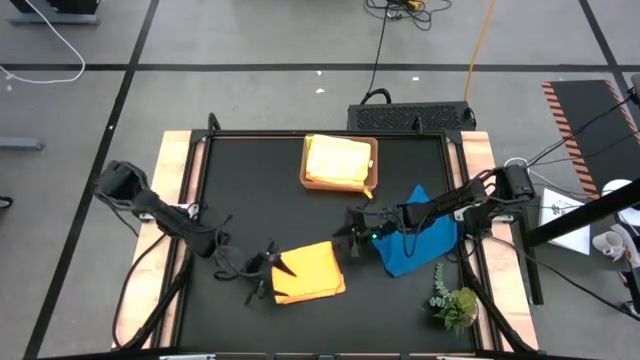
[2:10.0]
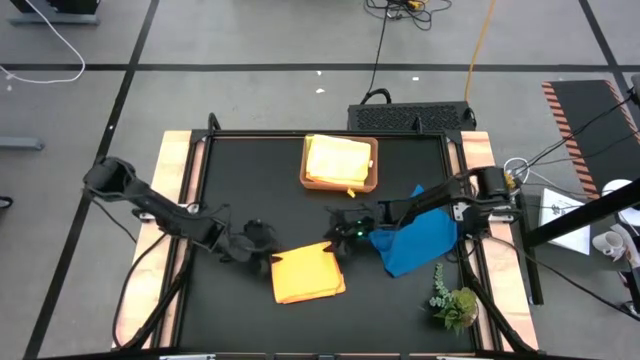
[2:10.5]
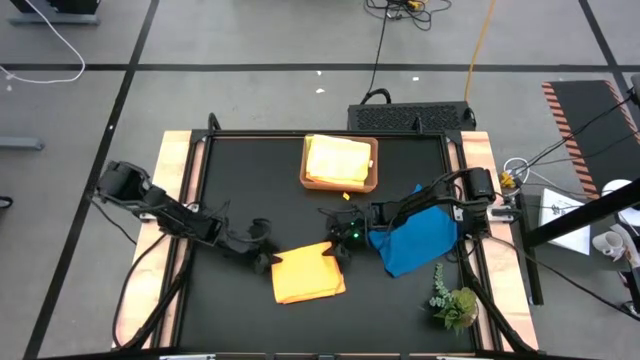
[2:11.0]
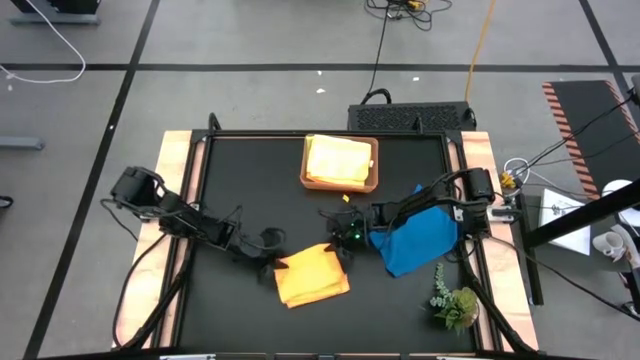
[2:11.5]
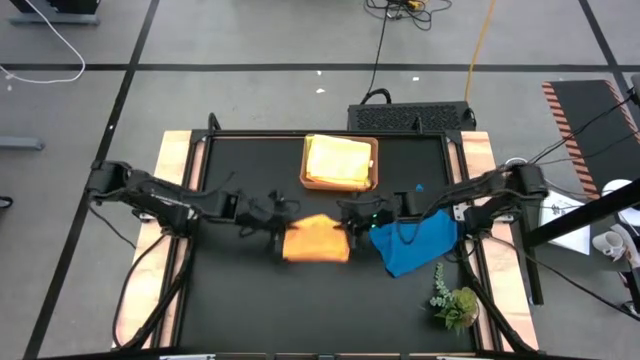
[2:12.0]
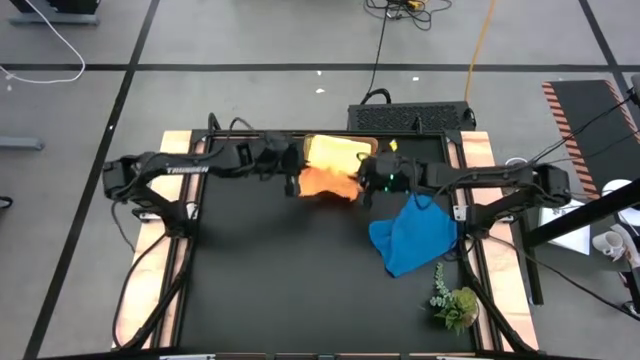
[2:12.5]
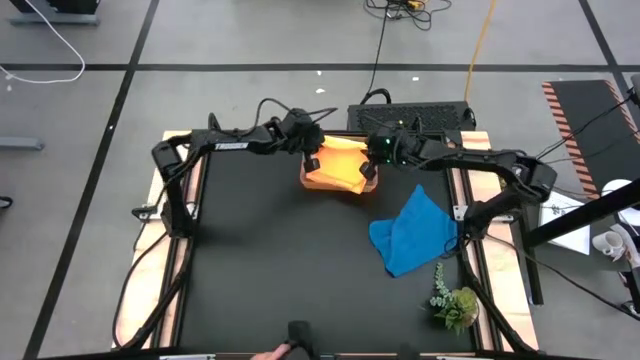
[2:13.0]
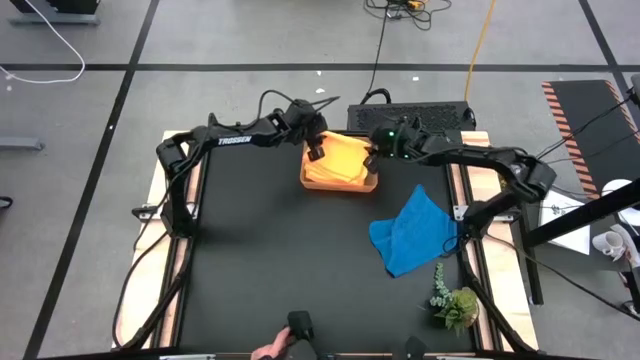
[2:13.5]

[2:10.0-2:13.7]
Task: Fold microfiber towels
Put the orange microfiber cloth into the orange bin

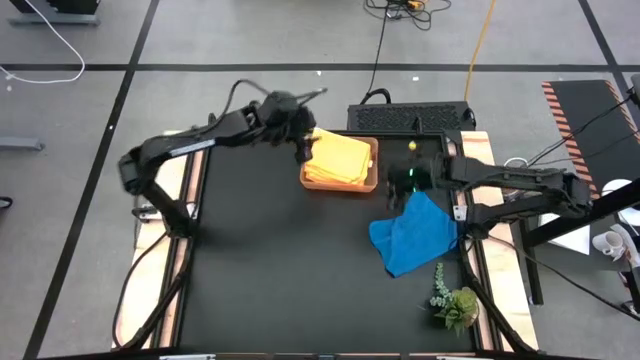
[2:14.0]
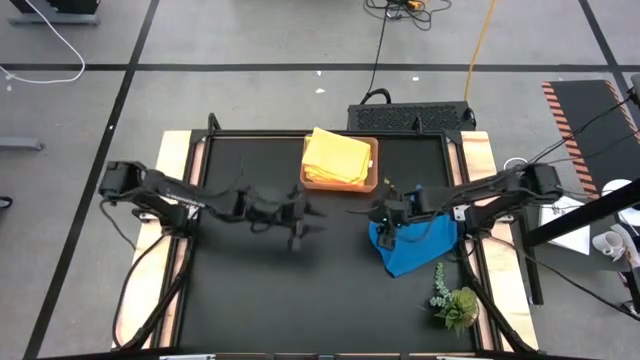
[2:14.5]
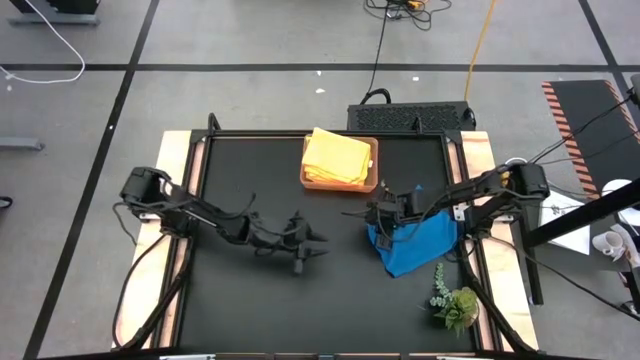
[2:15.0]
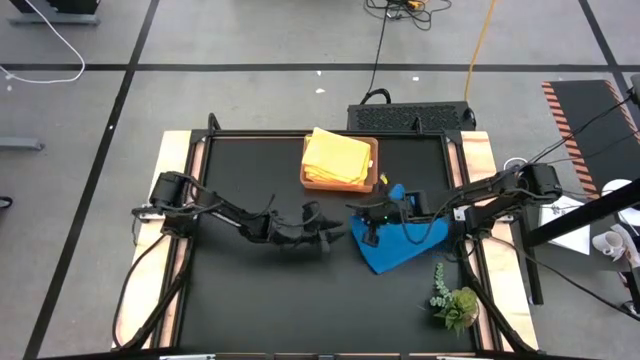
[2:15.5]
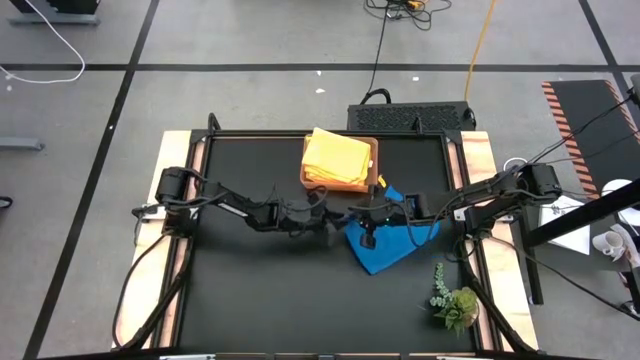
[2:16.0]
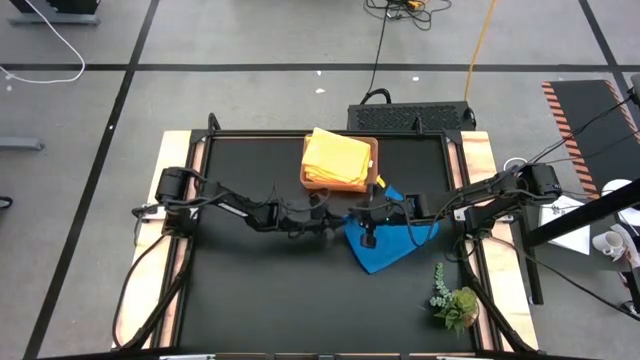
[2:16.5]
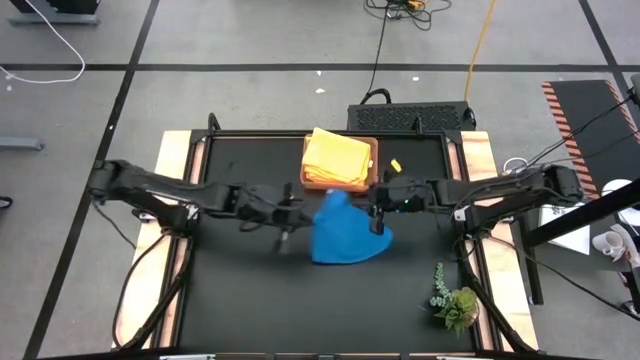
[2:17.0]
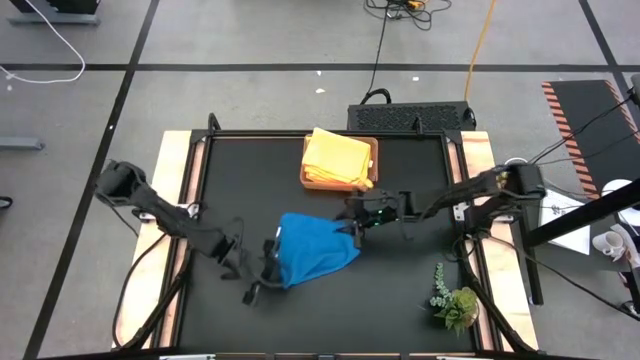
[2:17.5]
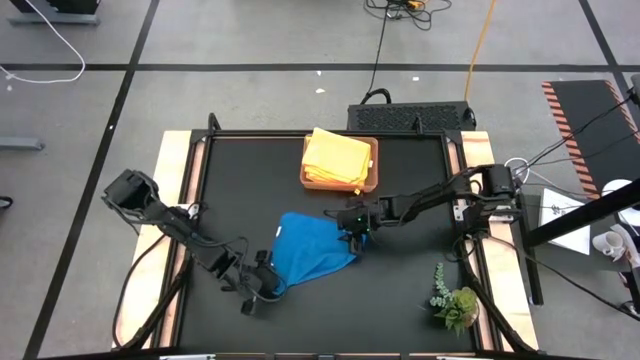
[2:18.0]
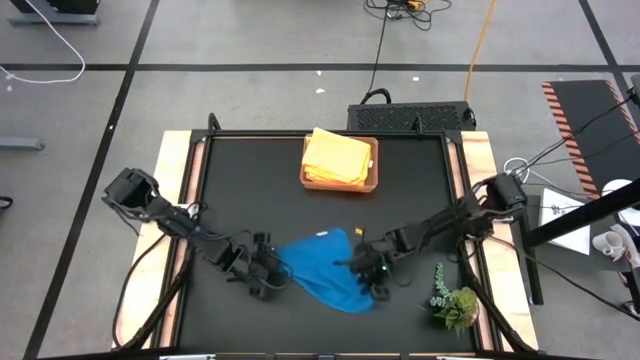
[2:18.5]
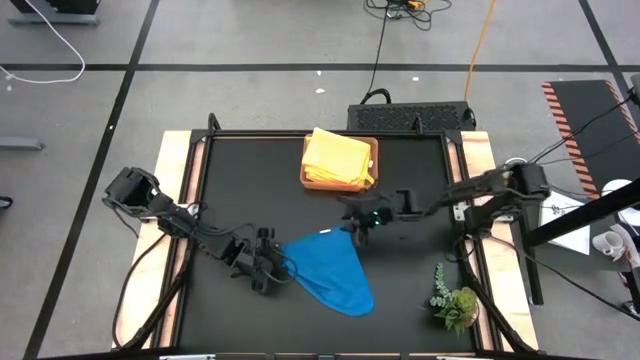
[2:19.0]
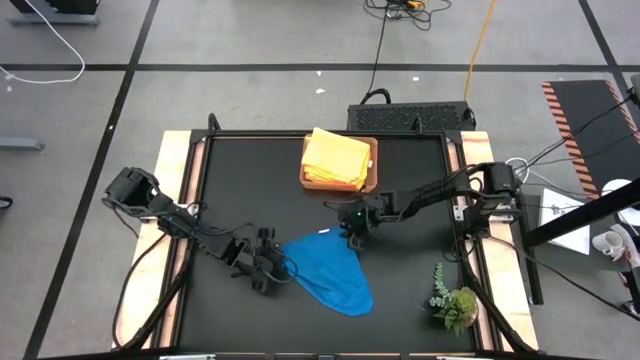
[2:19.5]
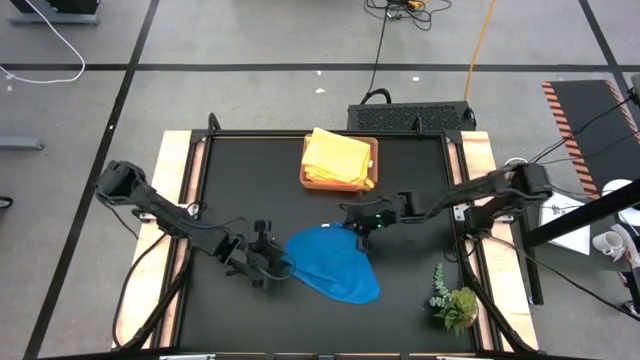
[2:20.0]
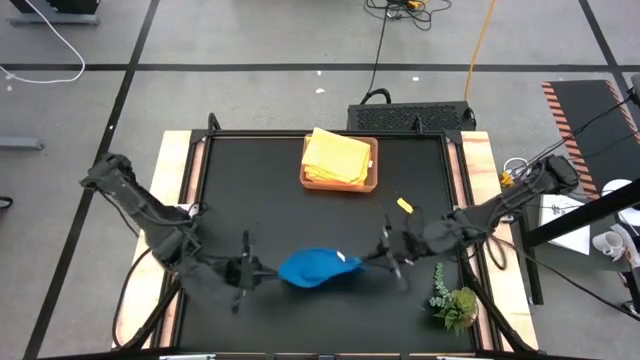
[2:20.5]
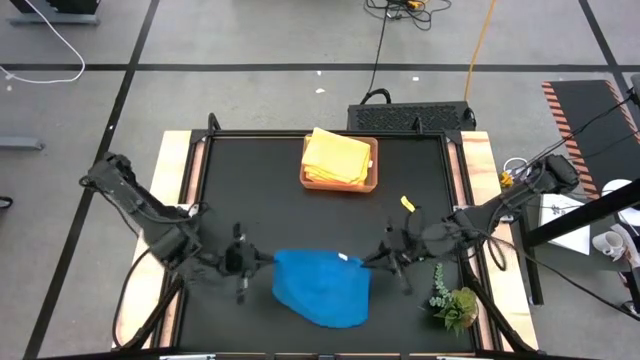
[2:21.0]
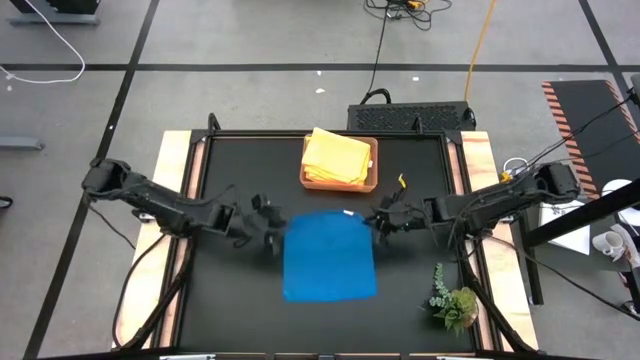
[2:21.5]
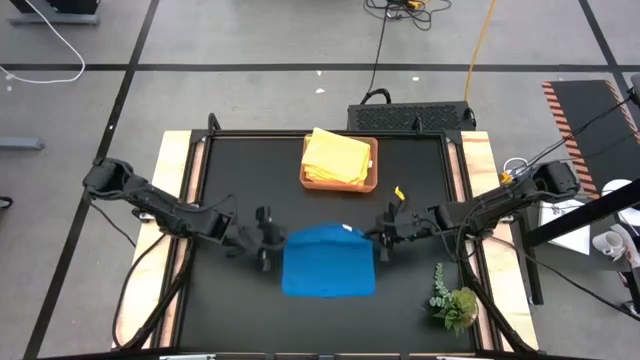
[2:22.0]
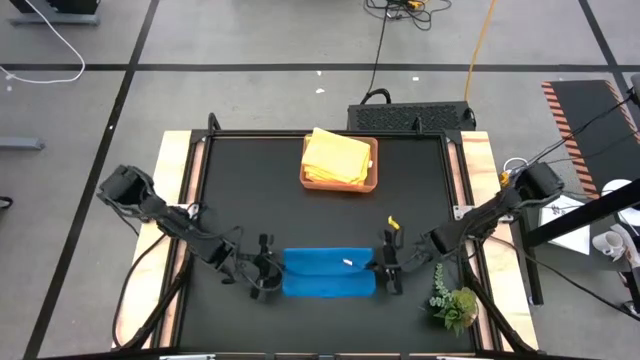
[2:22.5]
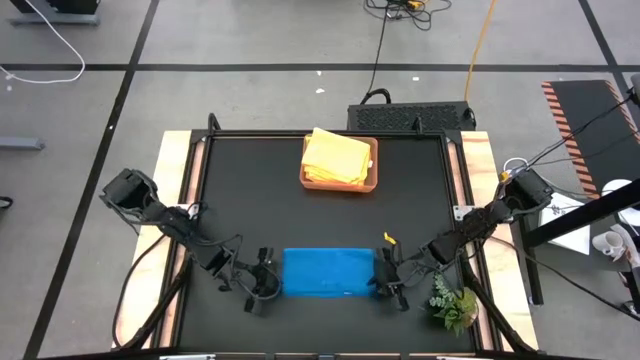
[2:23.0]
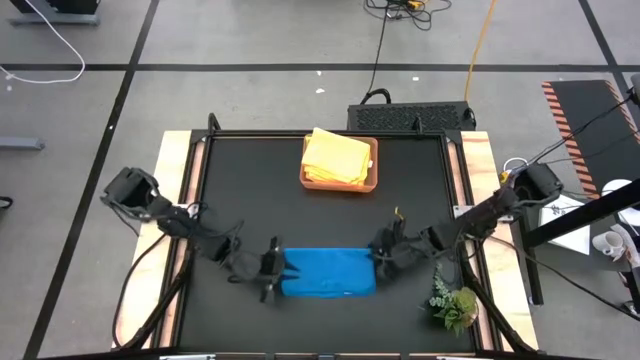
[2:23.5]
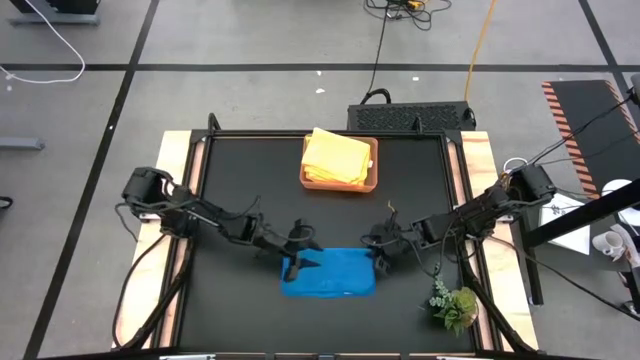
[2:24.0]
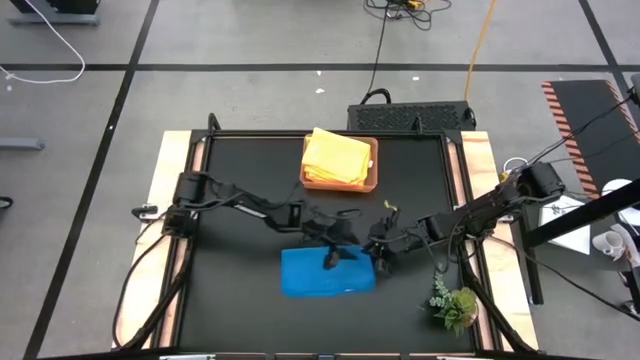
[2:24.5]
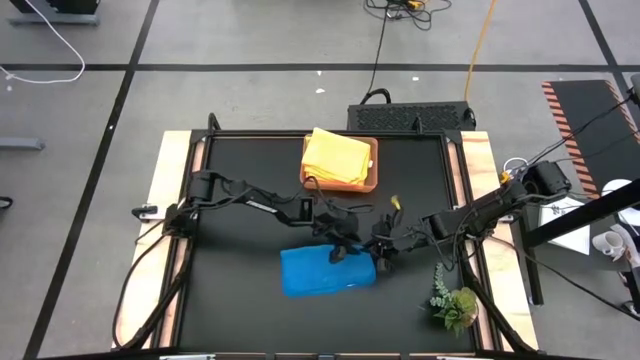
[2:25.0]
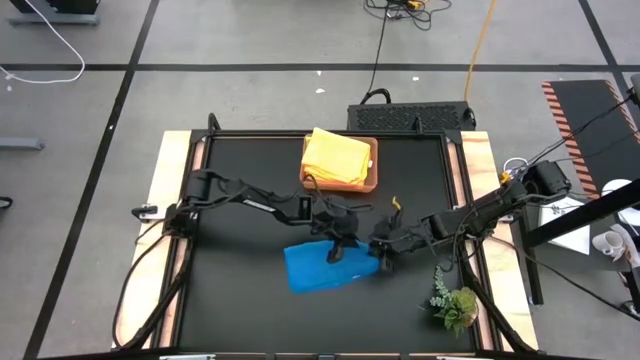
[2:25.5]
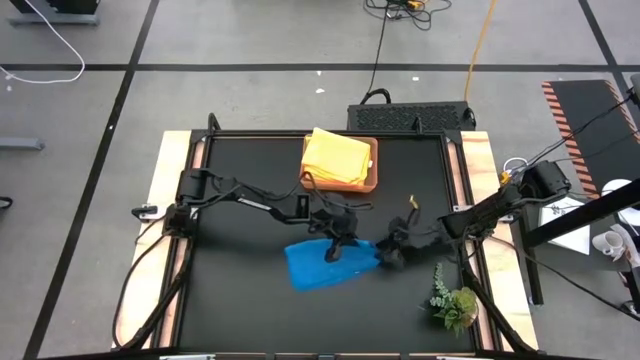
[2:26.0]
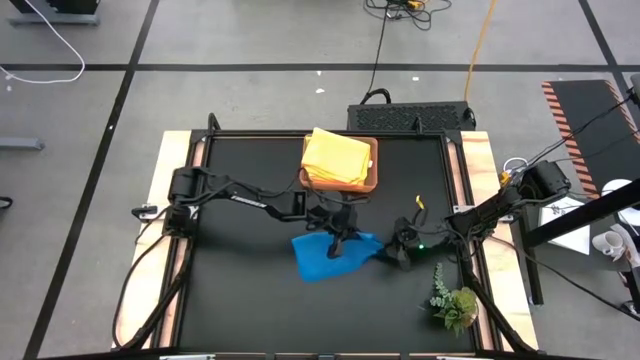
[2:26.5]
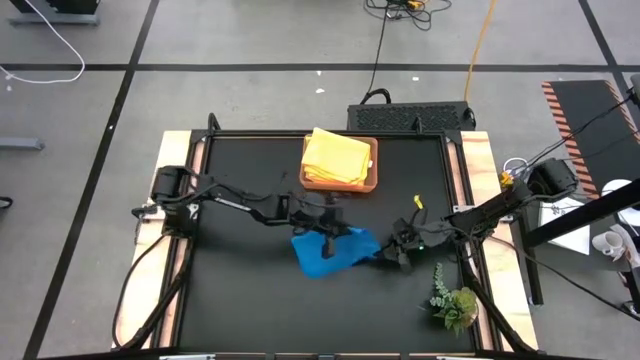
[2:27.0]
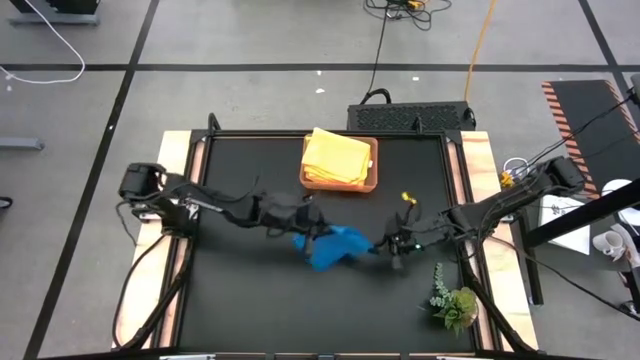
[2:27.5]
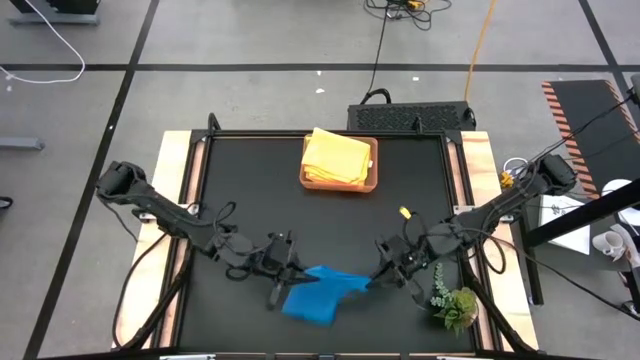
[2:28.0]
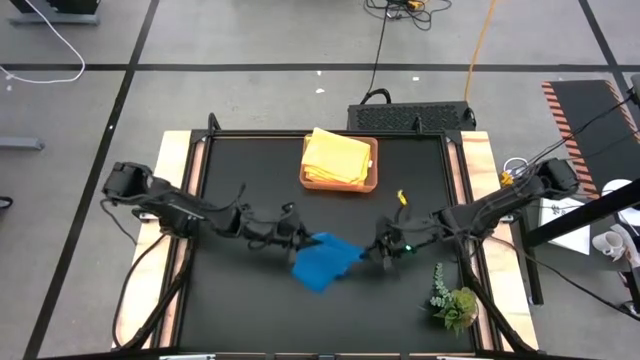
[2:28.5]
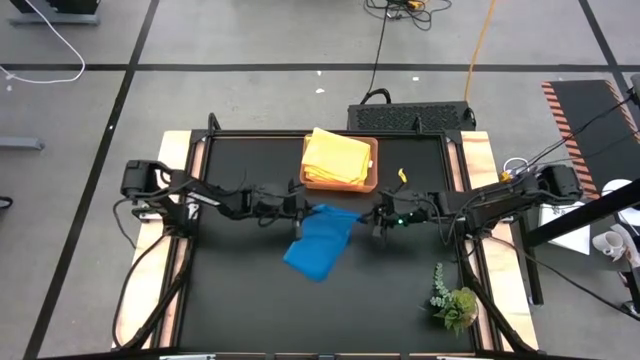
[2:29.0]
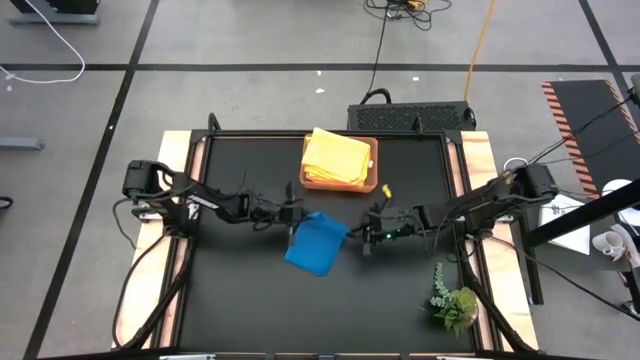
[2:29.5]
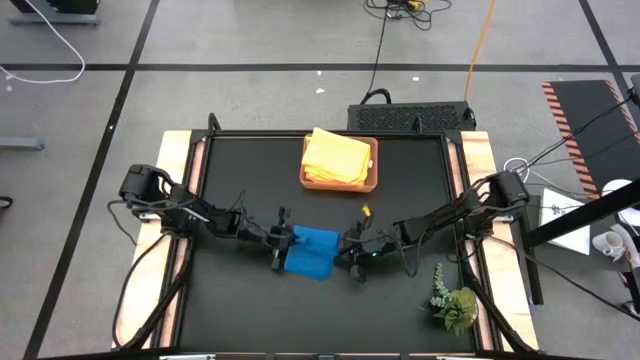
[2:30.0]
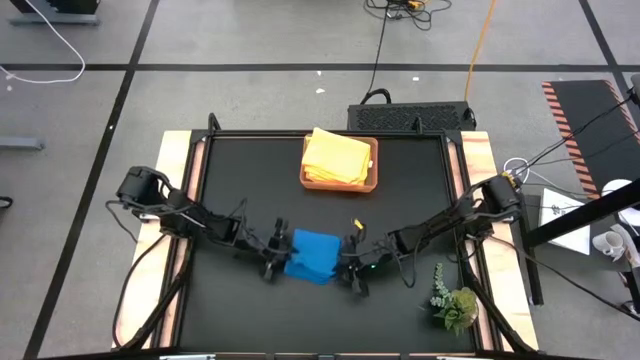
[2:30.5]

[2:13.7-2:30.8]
Fold the blue microfiber cloth

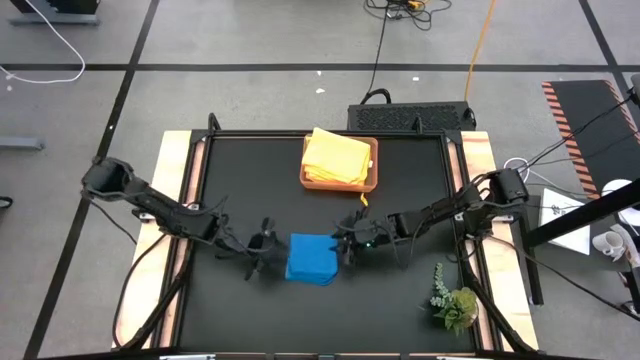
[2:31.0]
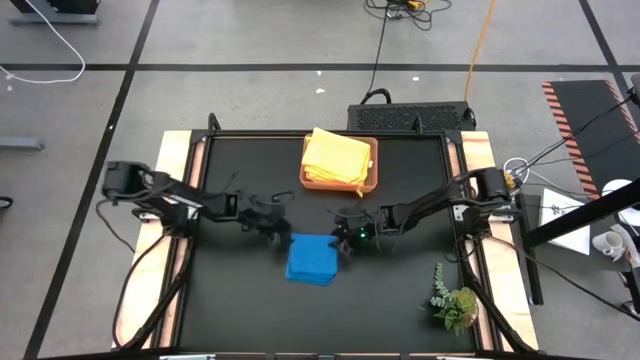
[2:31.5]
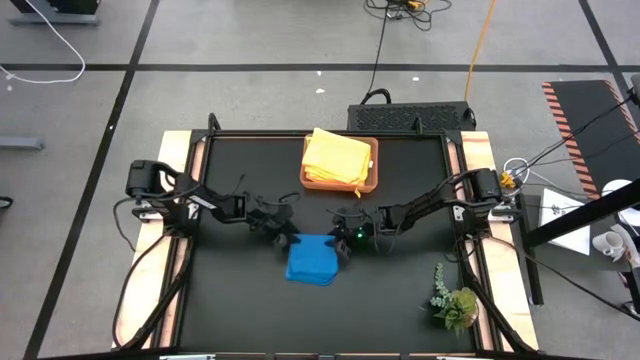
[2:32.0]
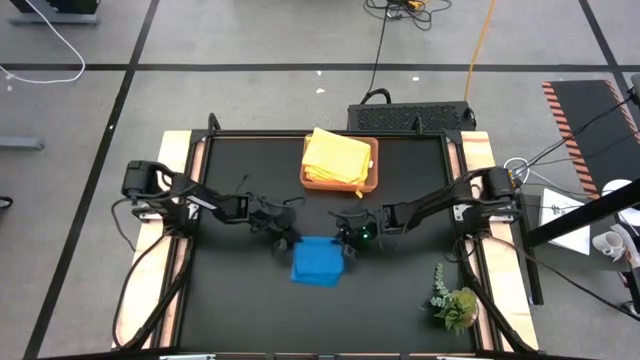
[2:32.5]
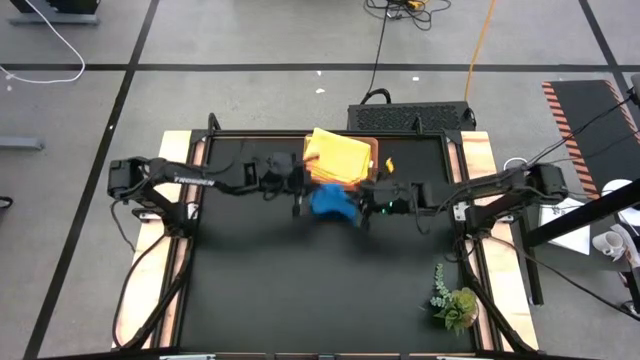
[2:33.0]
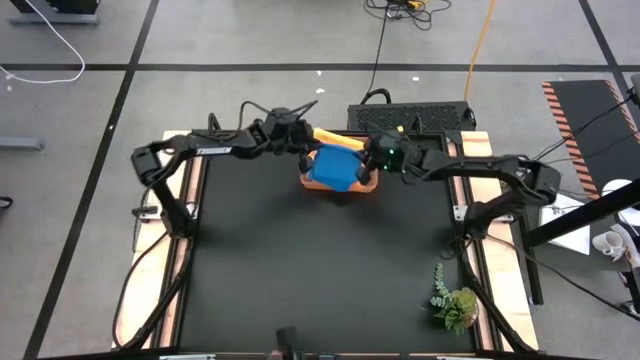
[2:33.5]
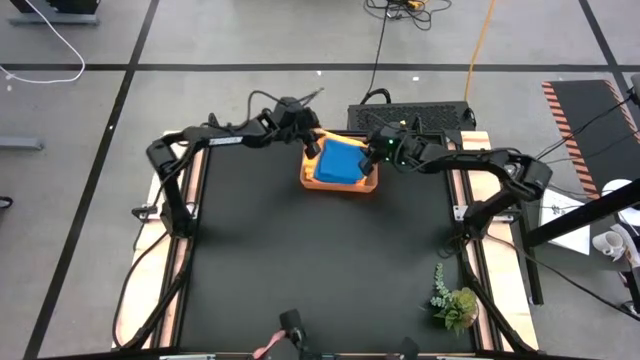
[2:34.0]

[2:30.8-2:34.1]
Put the blue microfiber cloth into the orange bin
